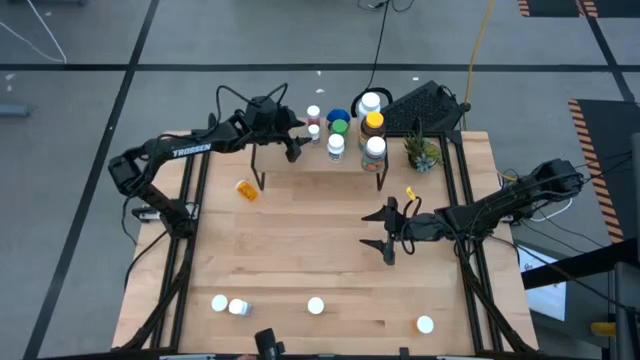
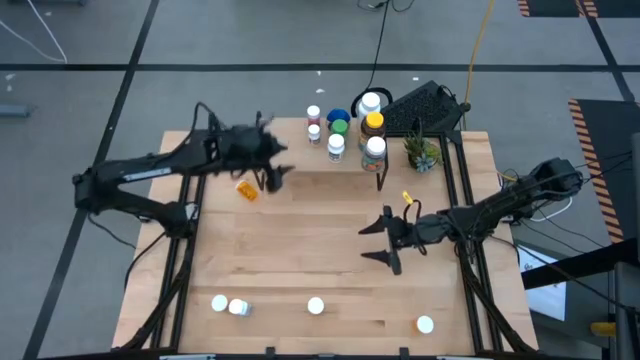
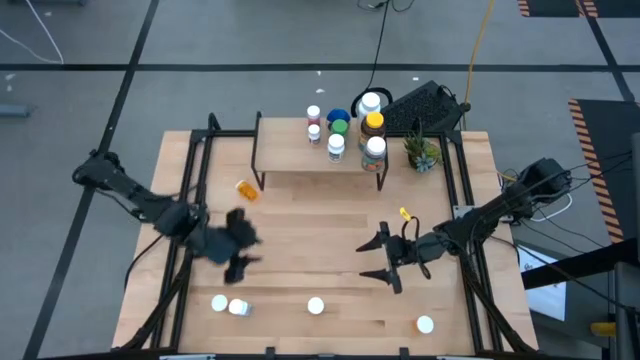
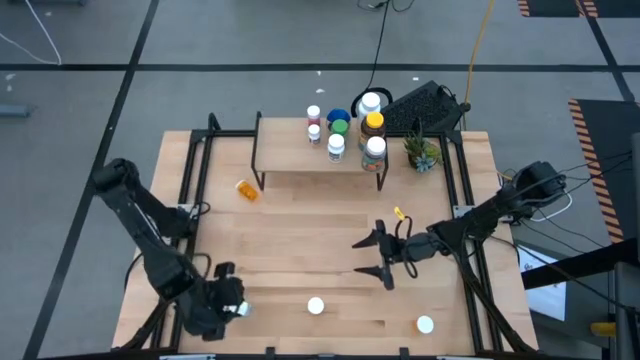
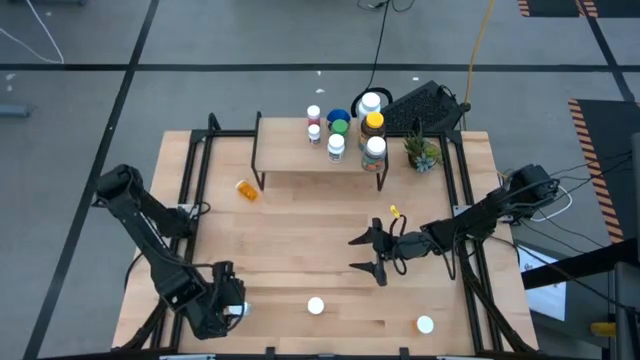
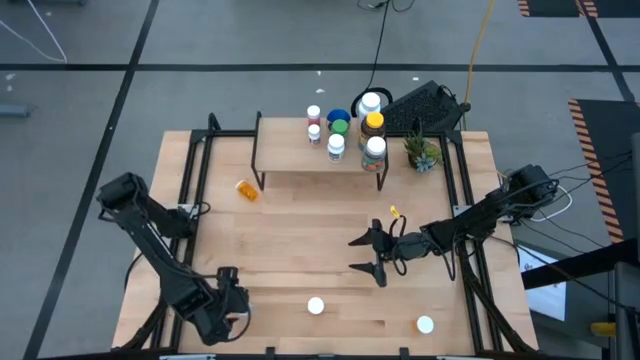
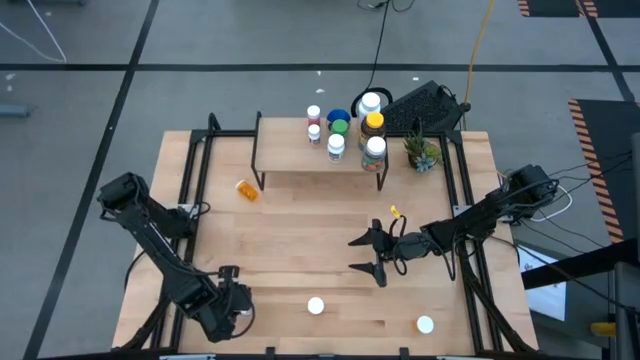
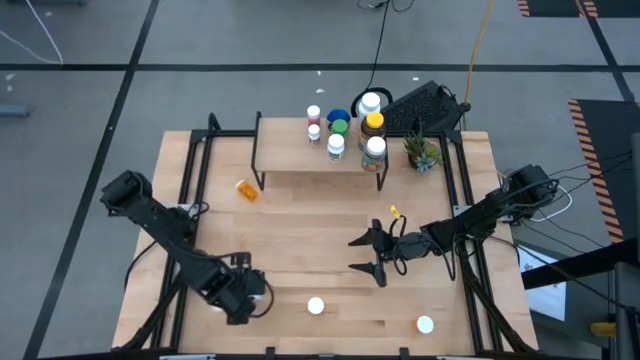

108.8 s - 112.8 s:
Task: Pick and place medicine bottles onto shelf by color
Put the white blue pill bottle on the shelf

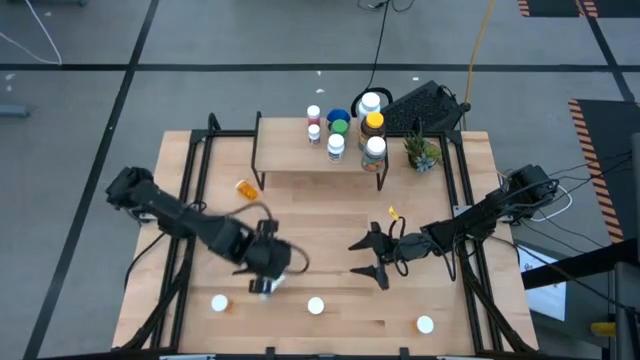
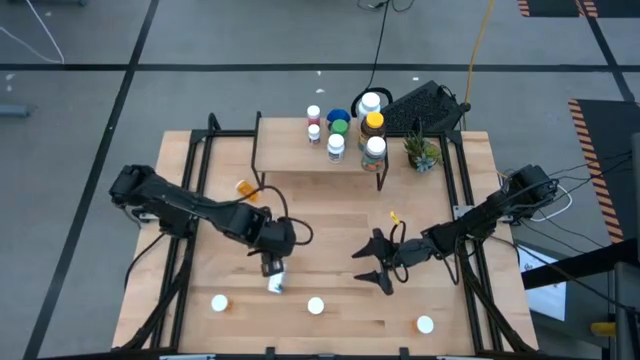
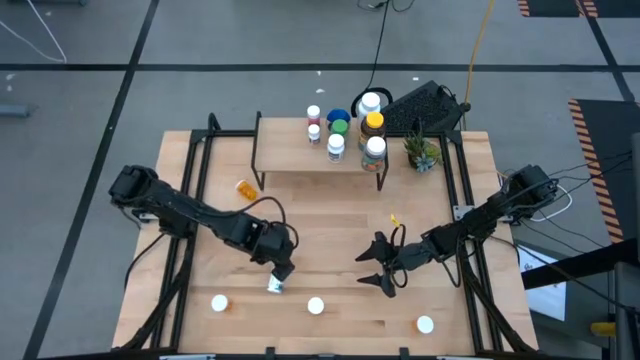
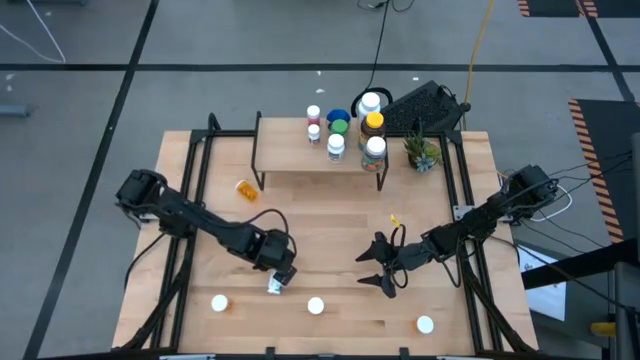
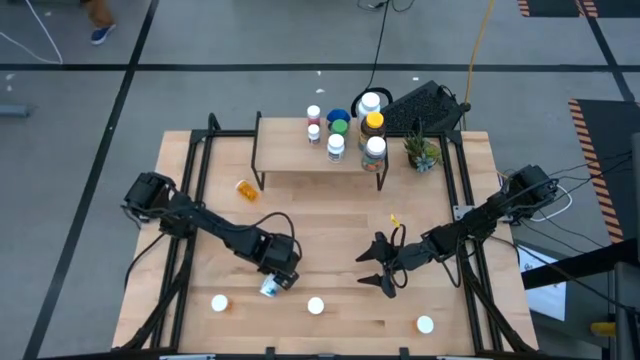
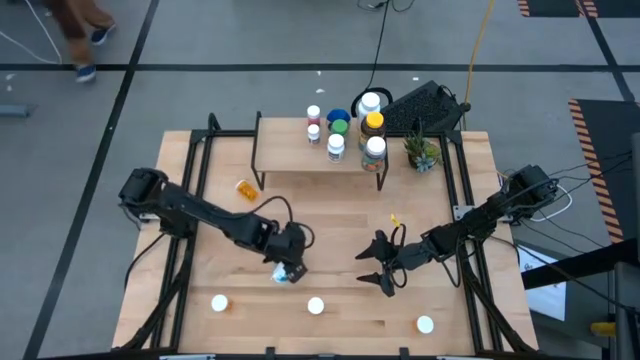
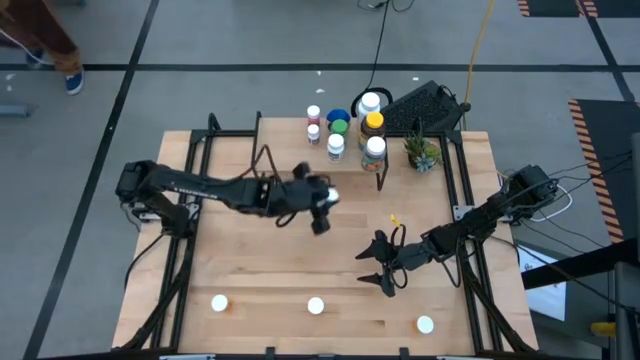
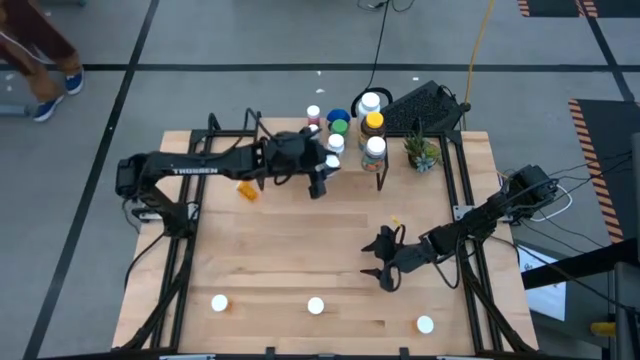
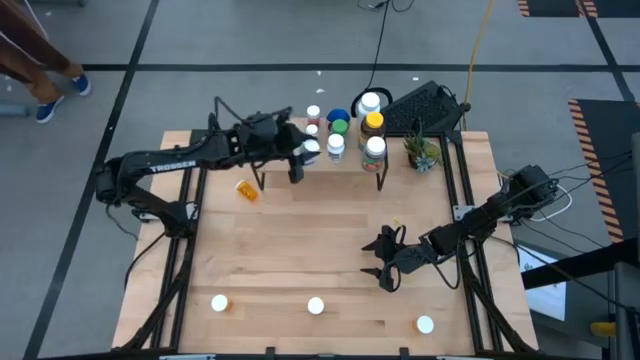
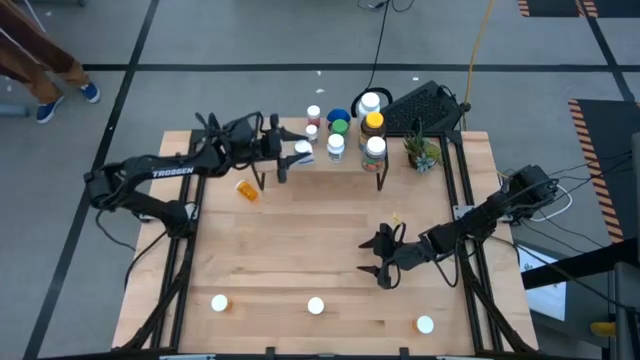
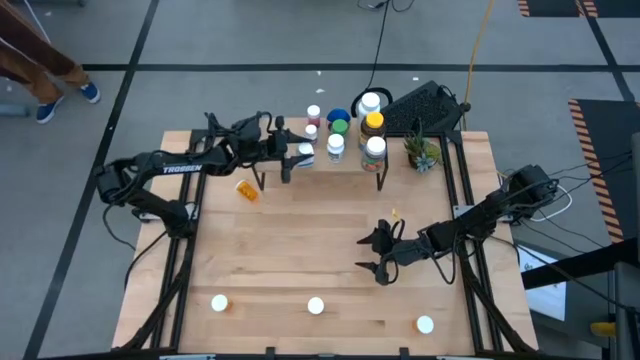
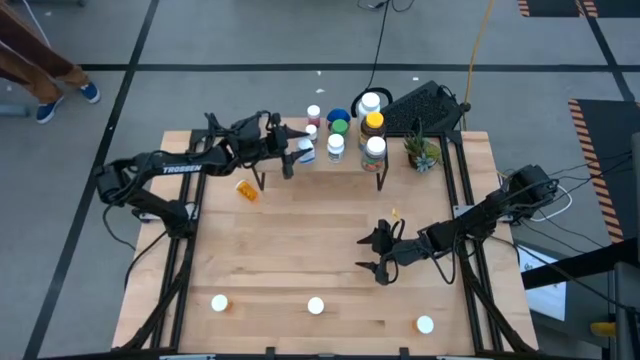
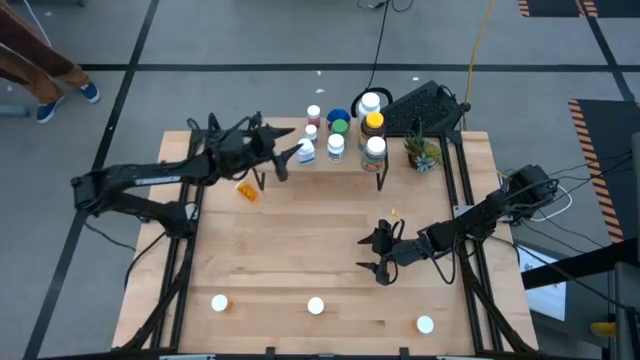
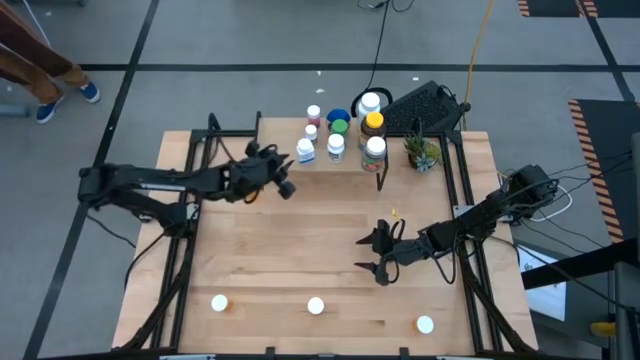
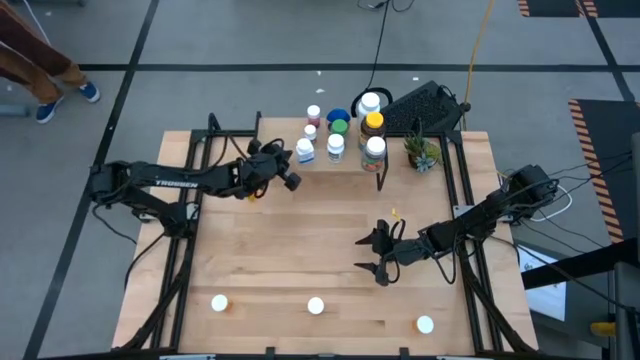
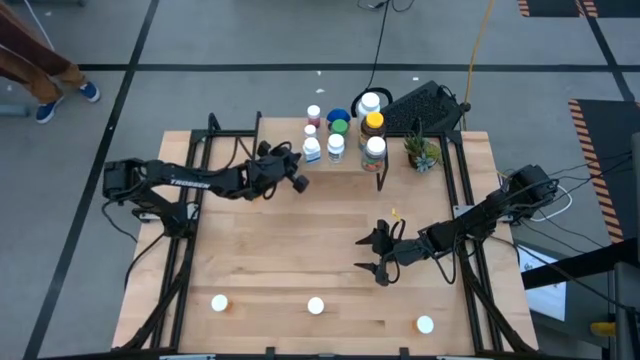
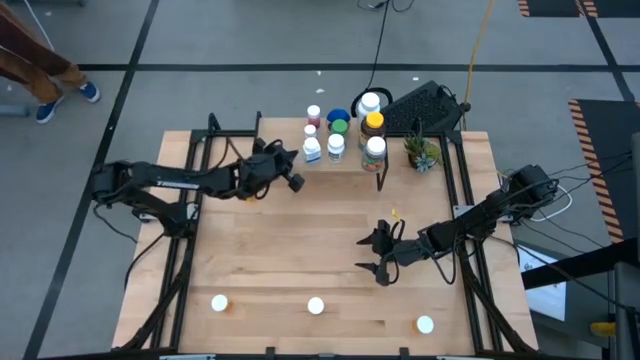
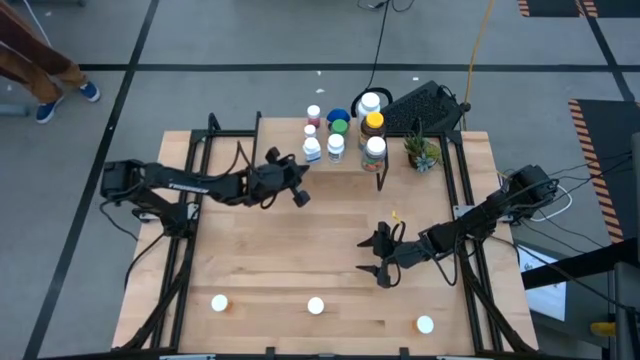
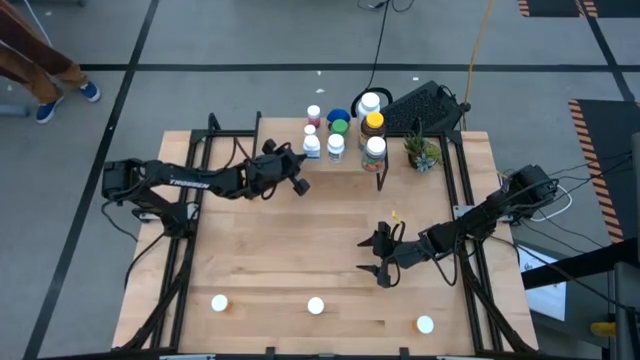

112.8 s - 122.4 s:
Put the white blue pill bottle on the shelf

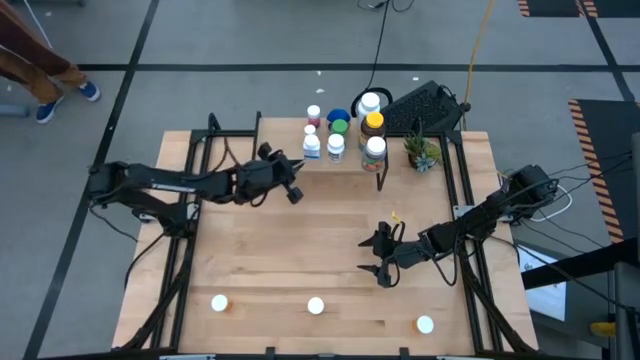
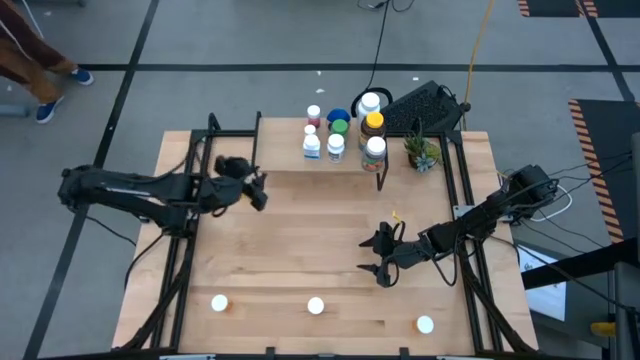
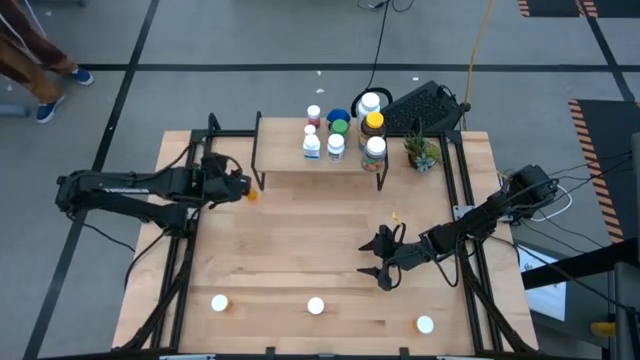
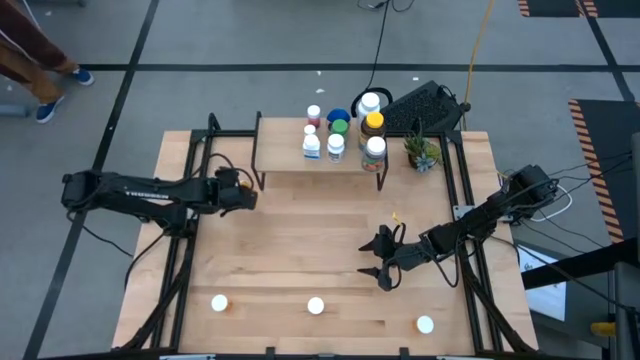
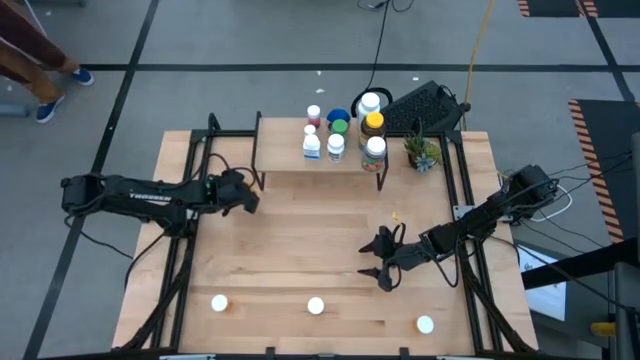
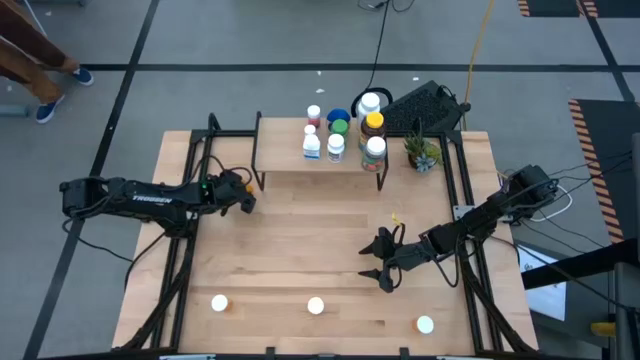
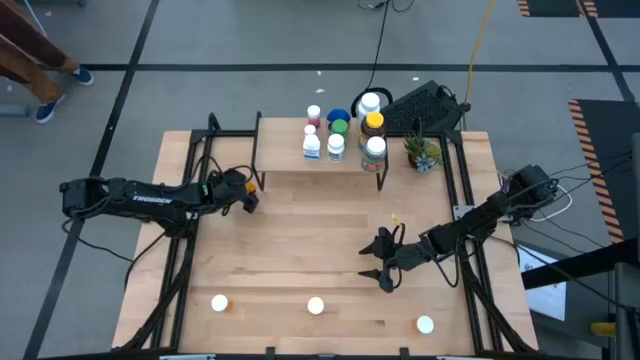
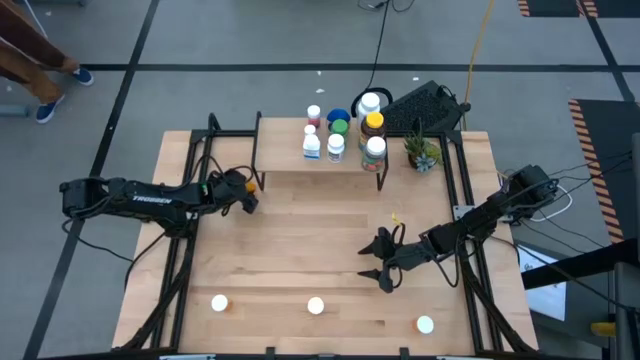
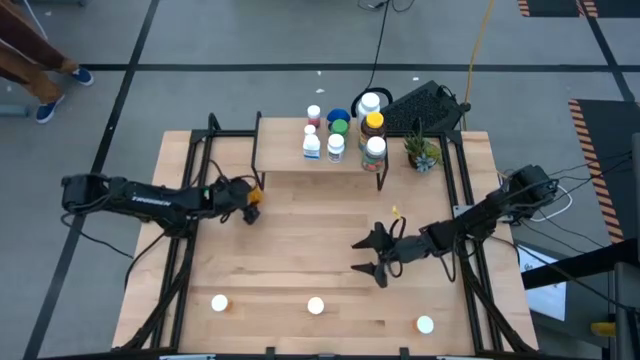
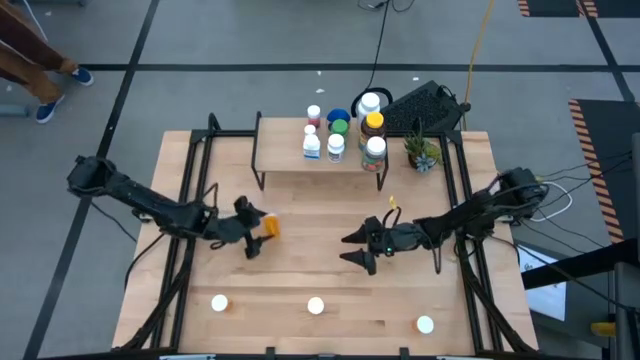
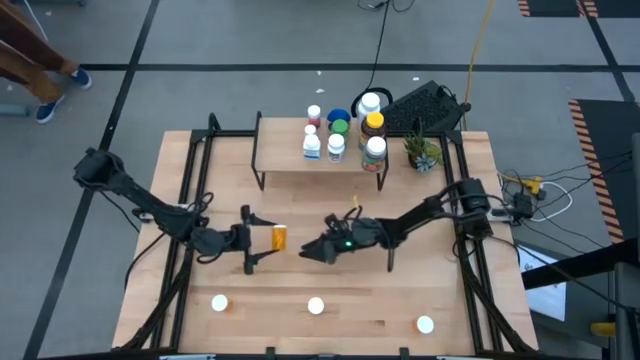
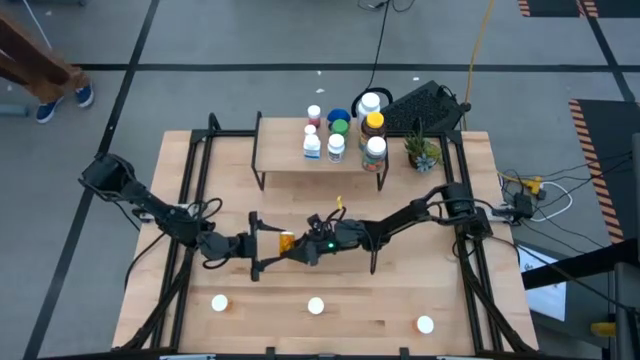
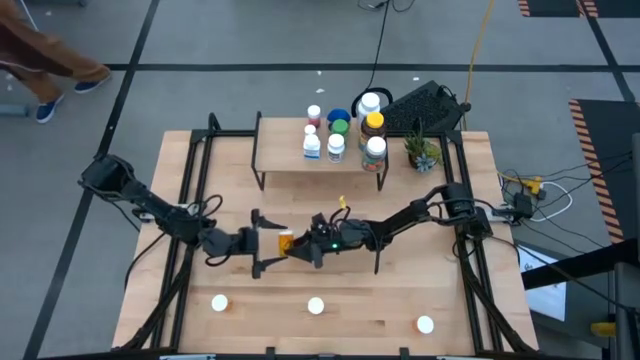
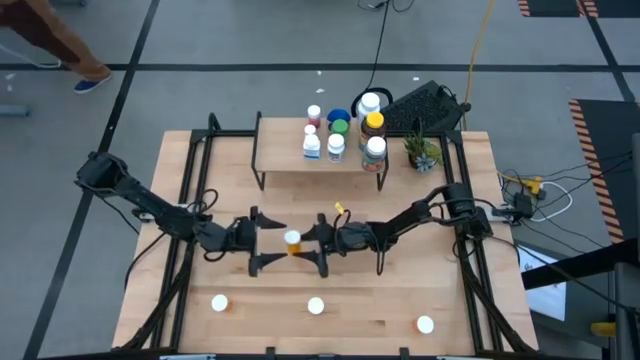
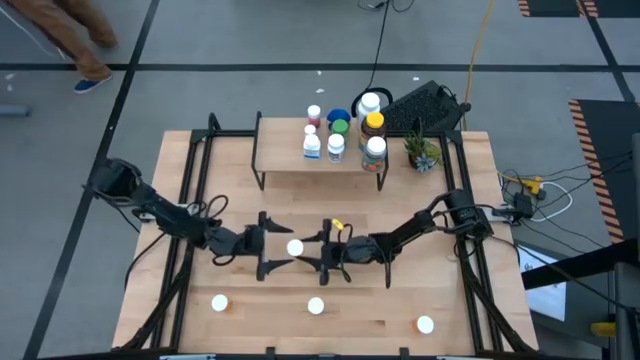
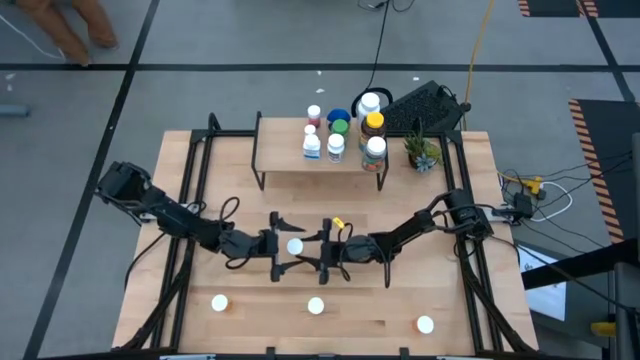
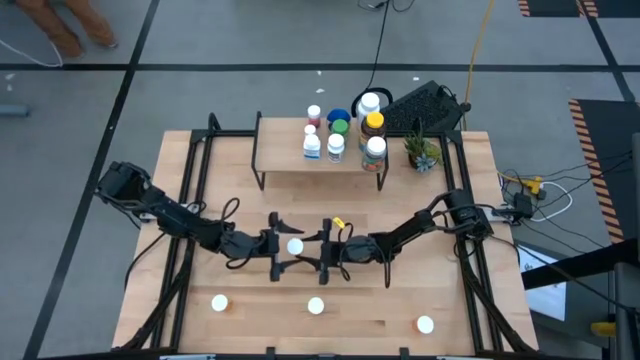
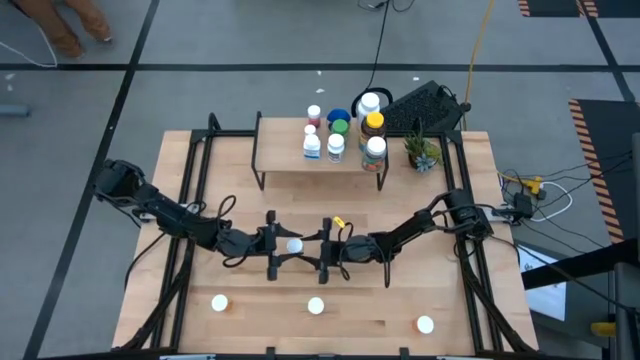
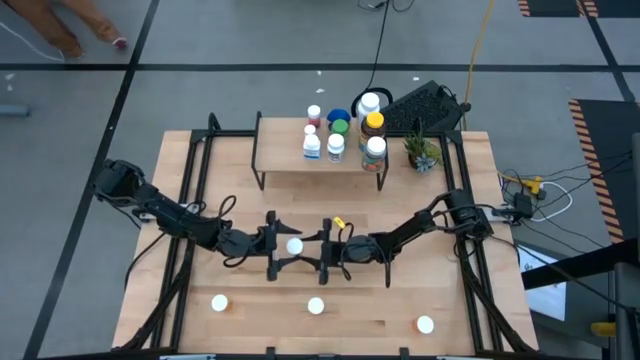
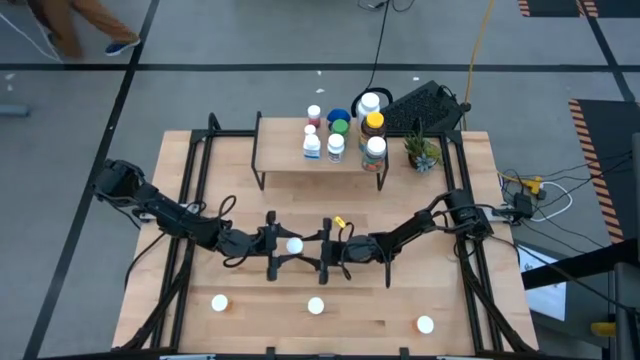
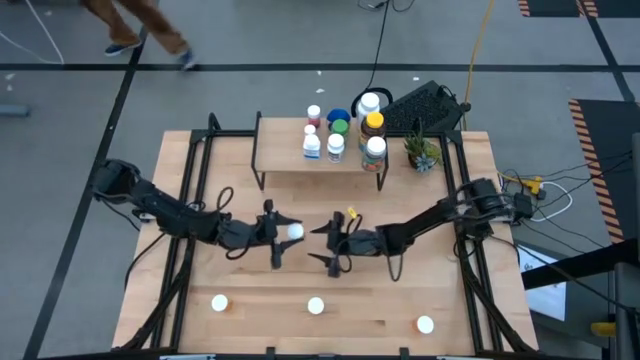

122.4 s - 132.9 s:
Put the top left orange pill bottle on the shelf
